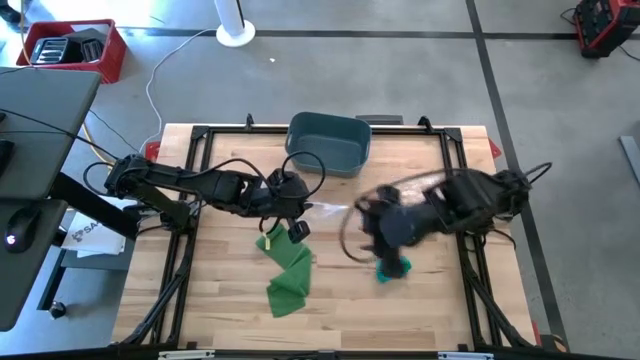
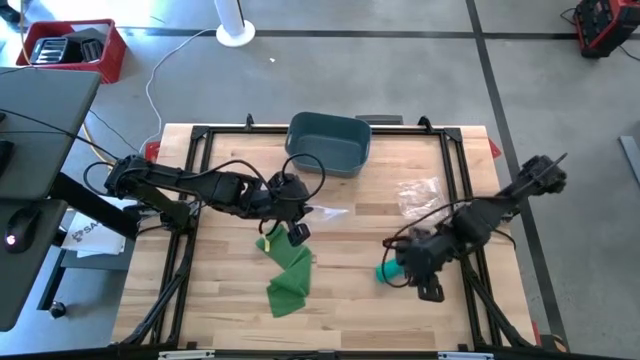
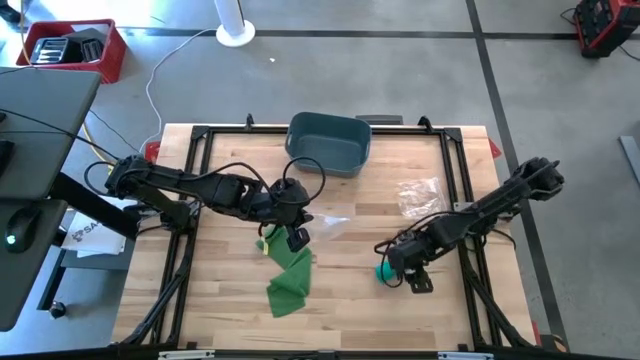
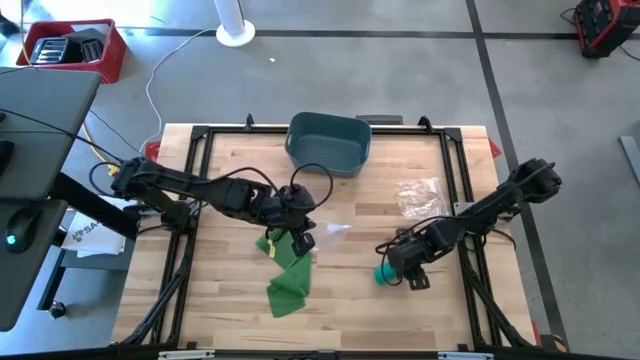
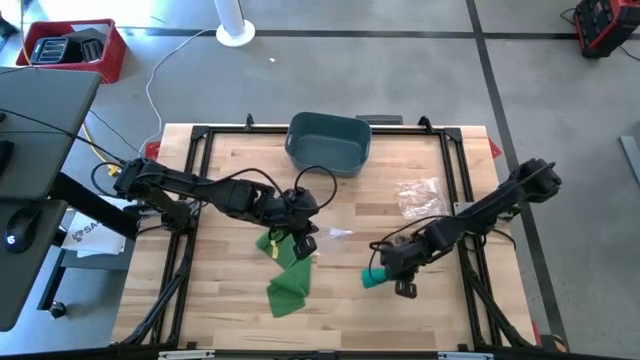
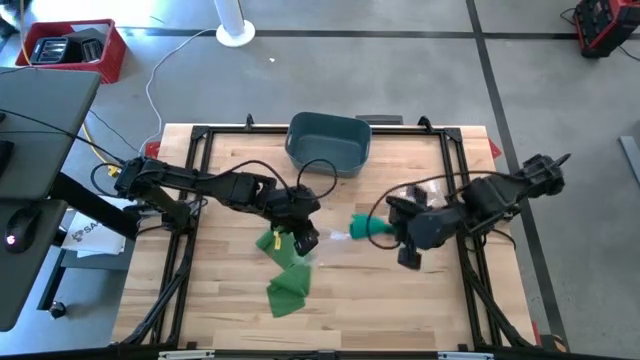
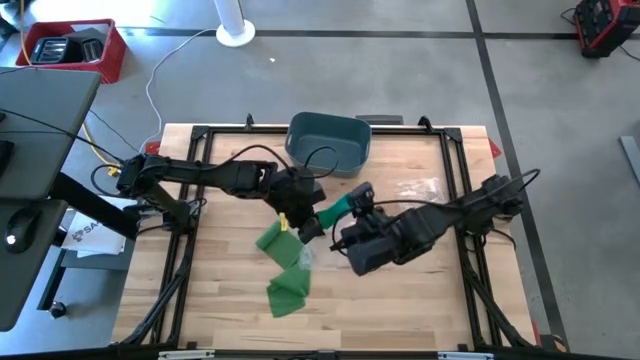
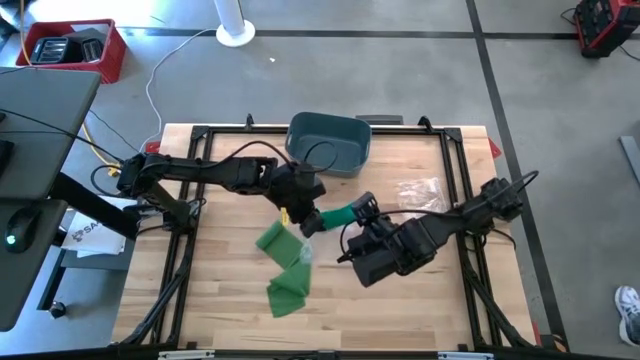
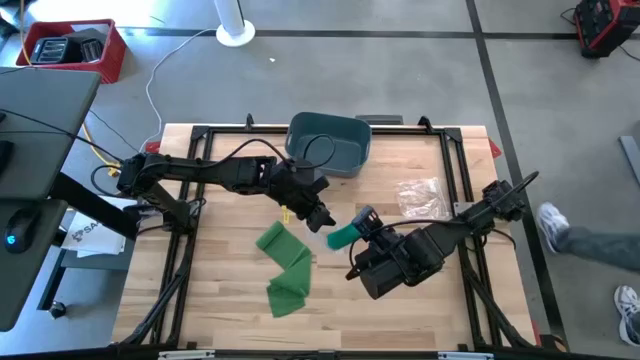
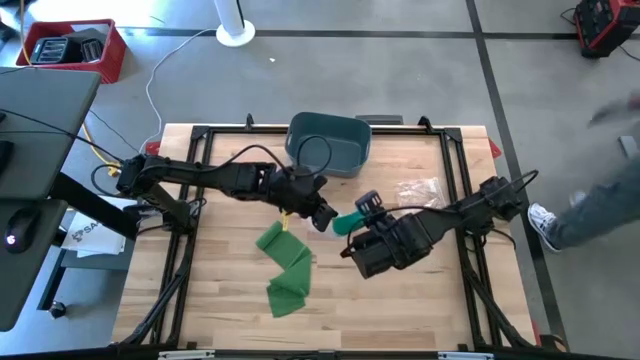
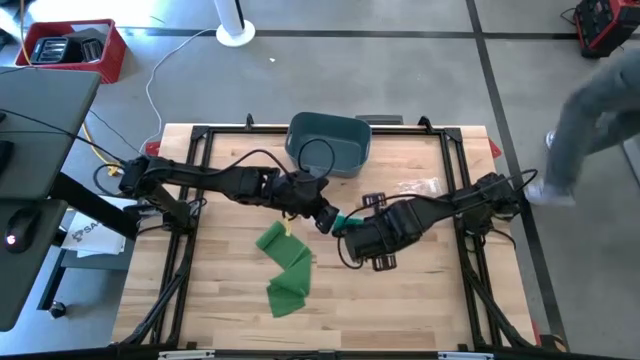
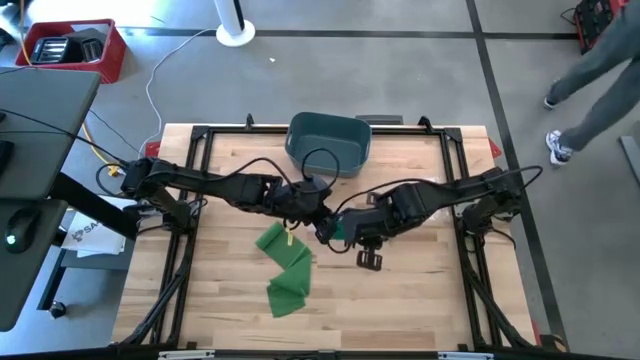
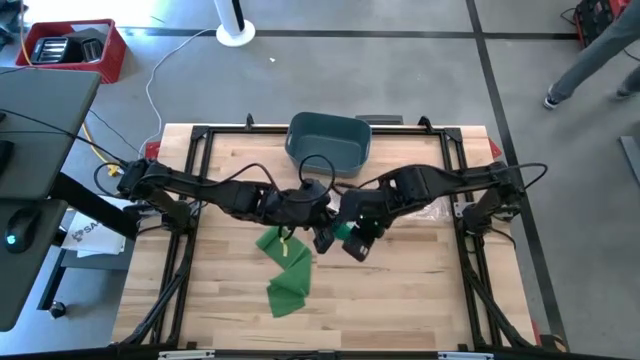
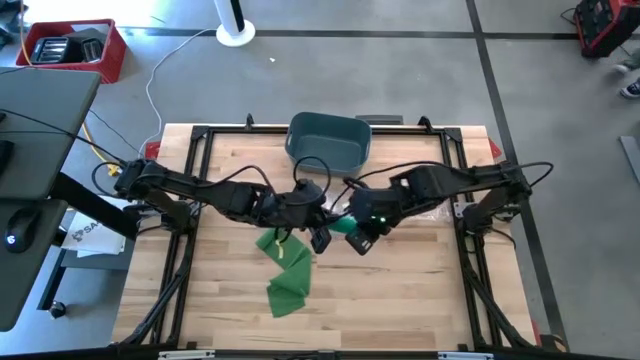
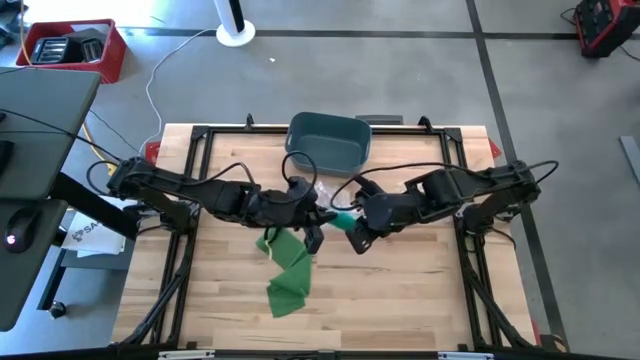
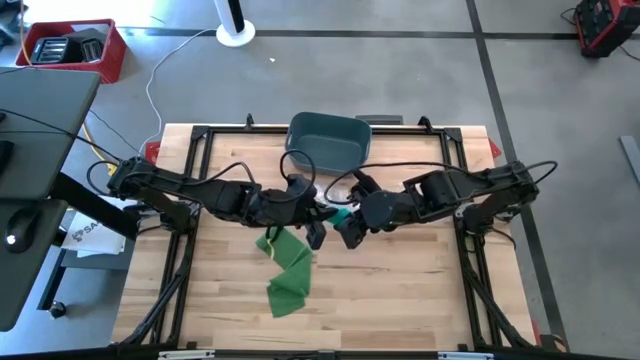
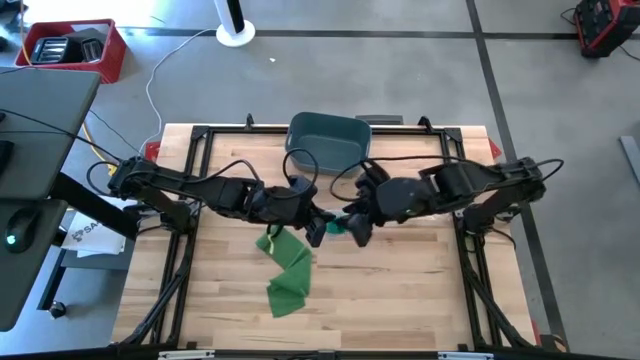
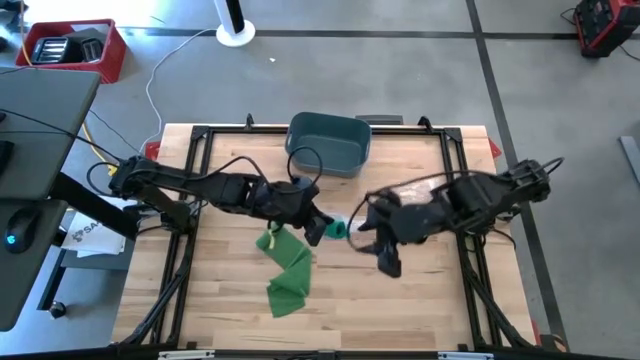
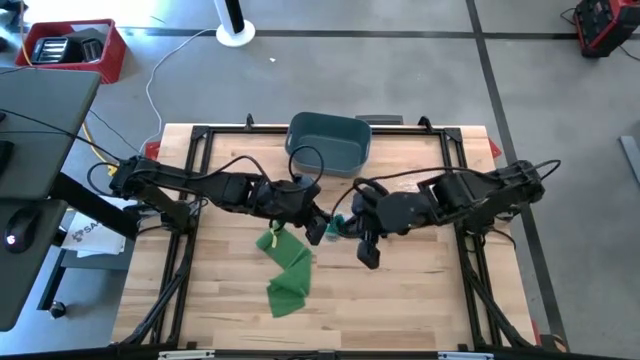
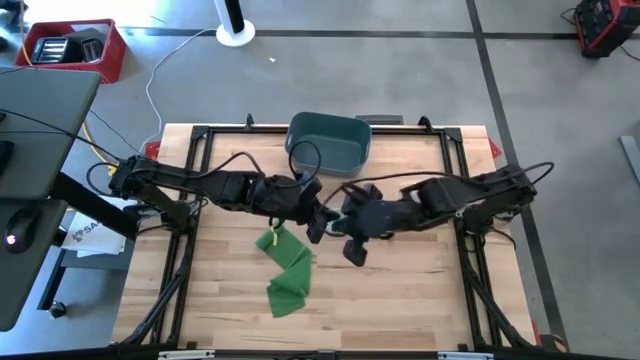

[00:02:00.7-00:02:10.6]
Task: Roll bandage
Put the rolled blue bandage into the transparent zip bag

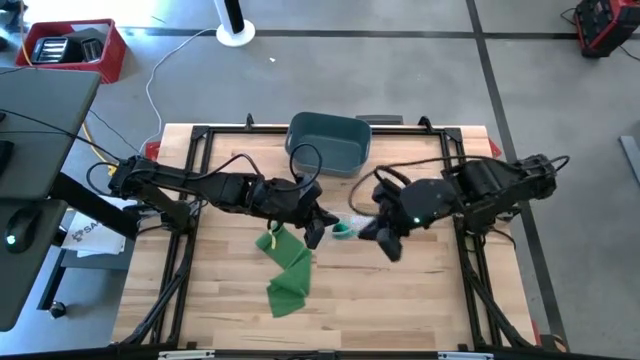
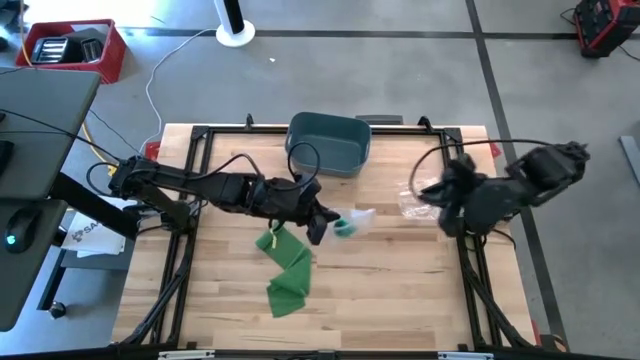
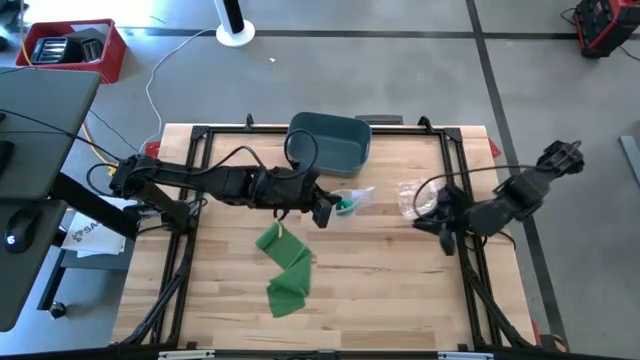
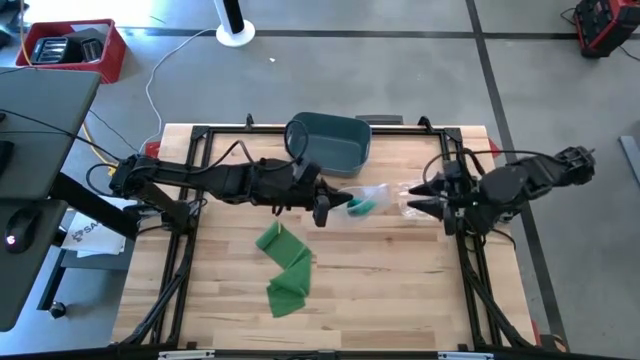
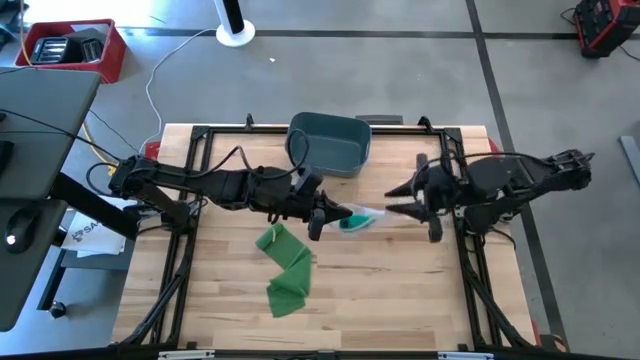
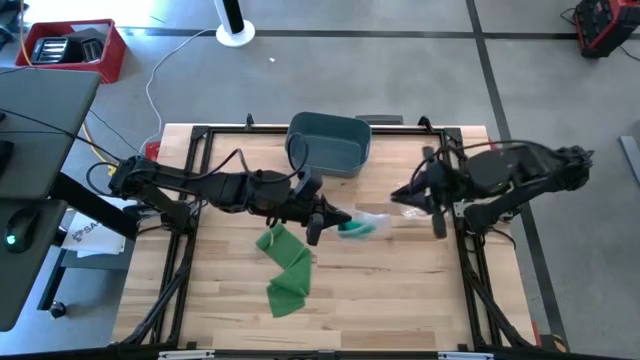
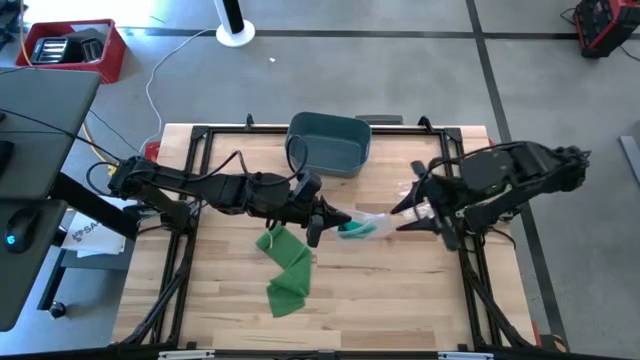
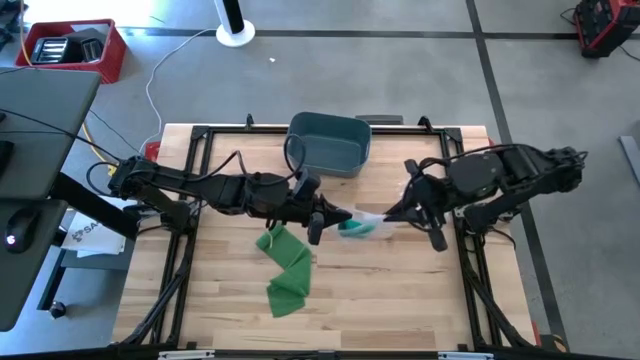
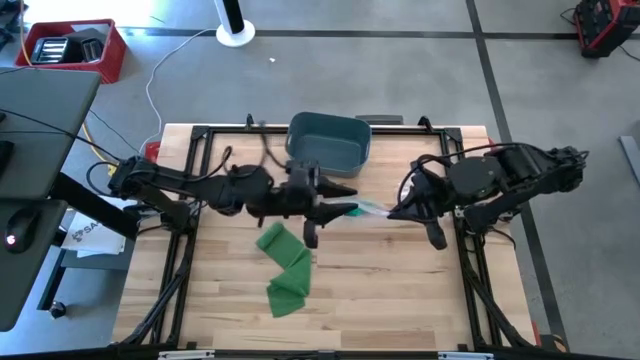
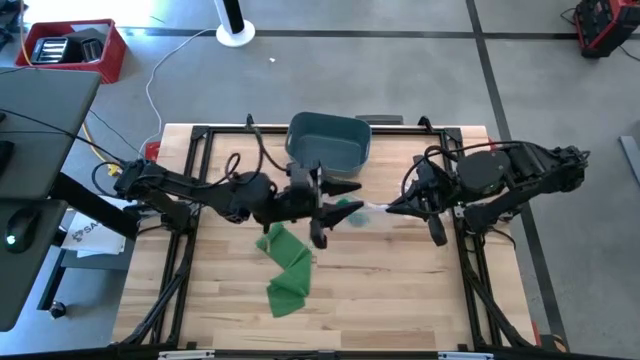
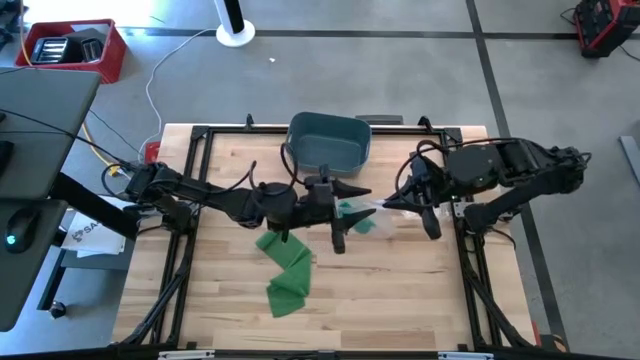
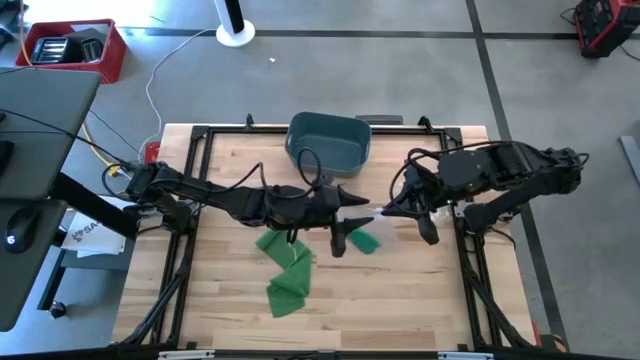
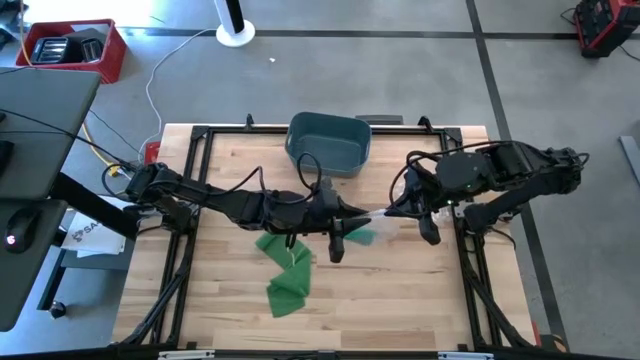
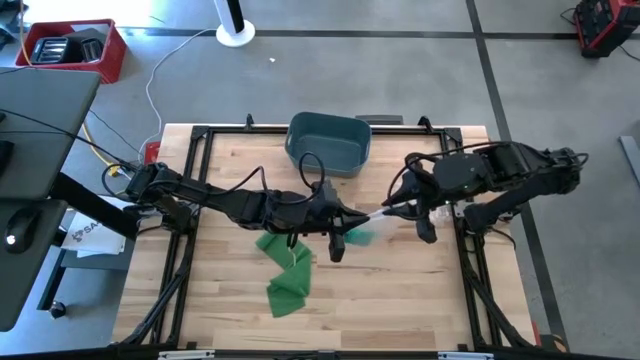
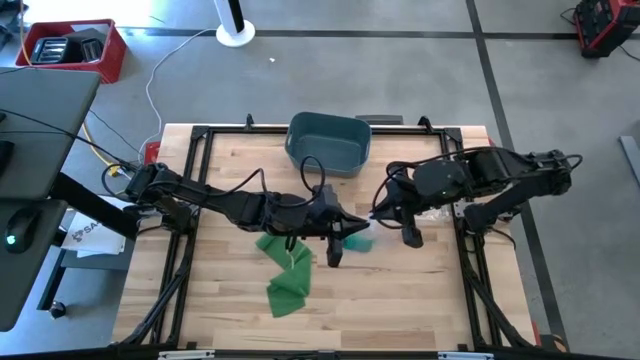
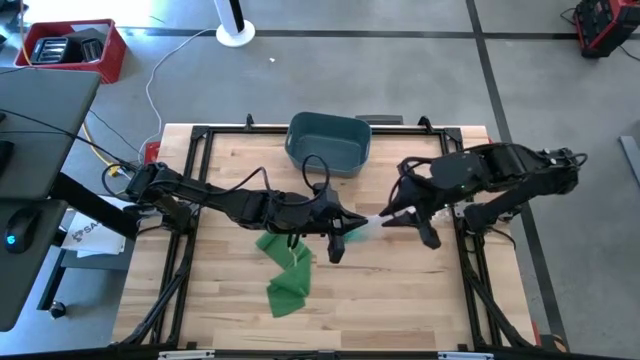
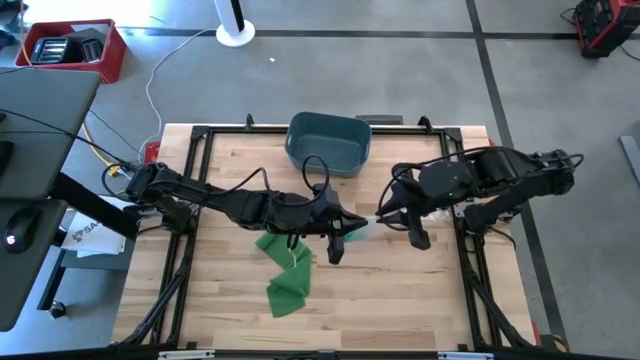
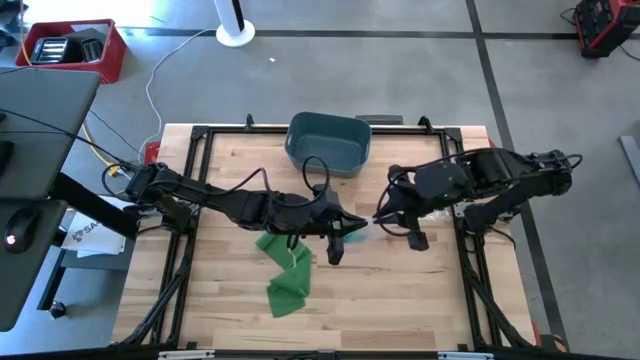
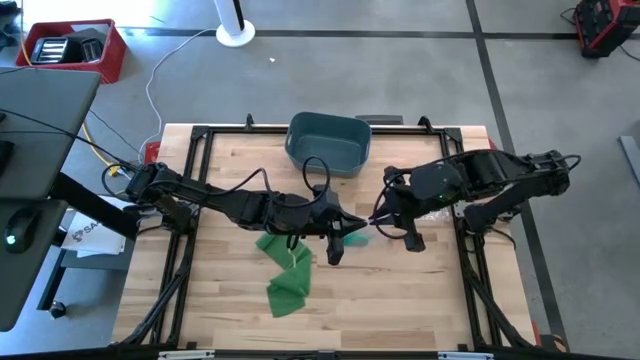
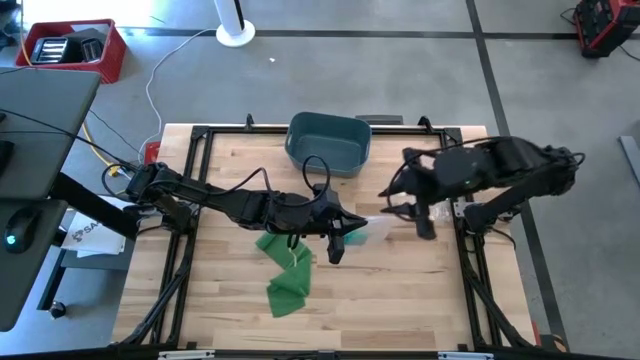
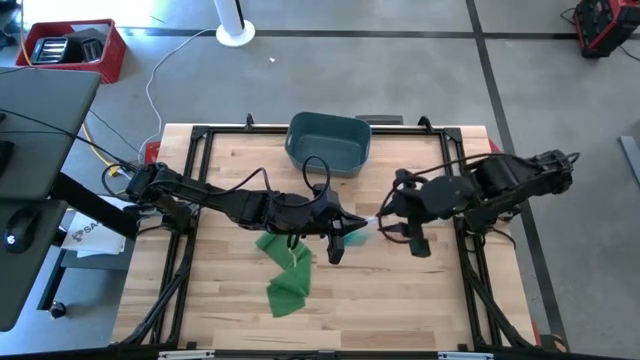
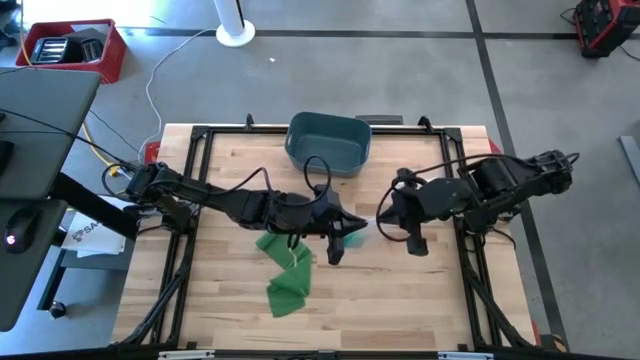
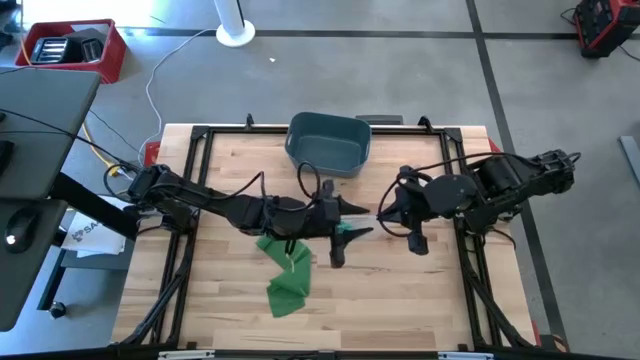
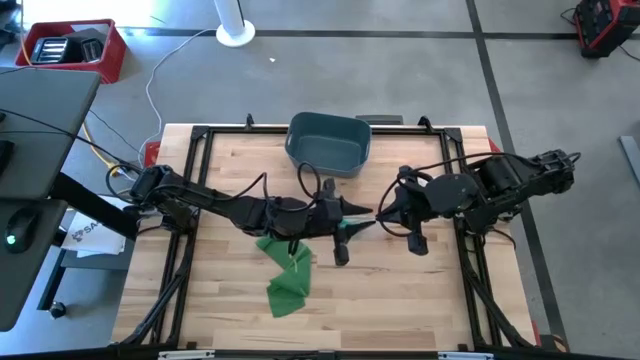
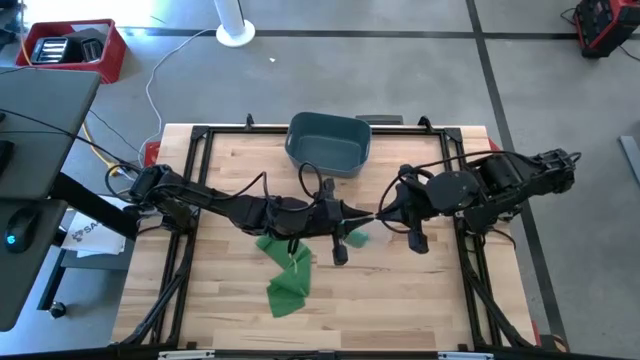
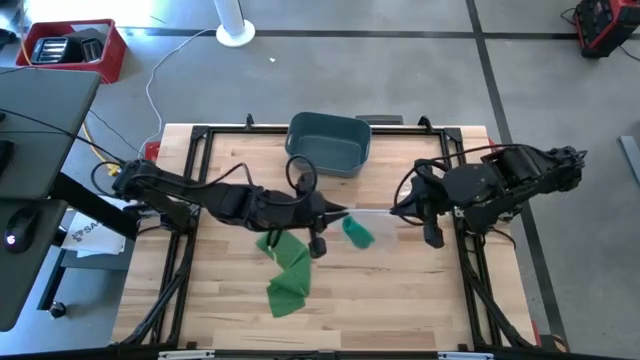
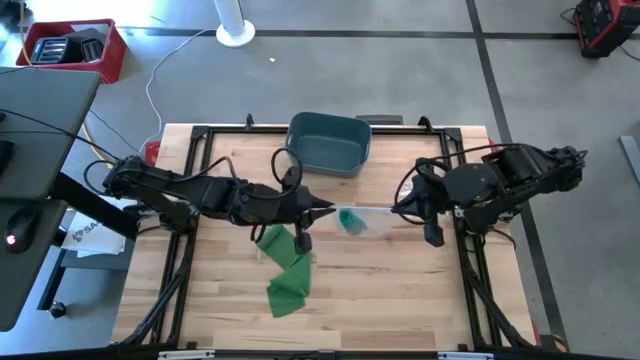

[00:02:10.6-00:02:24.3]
Close the transparent zip bag
